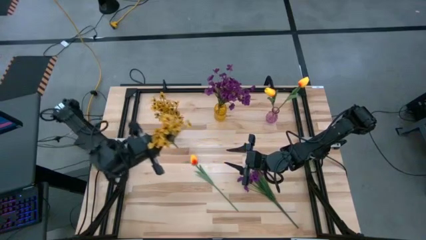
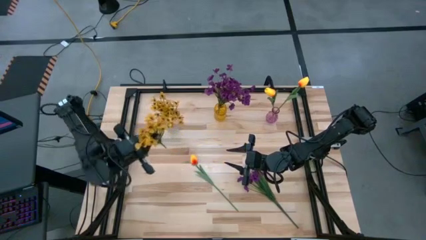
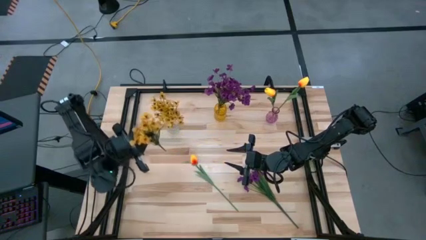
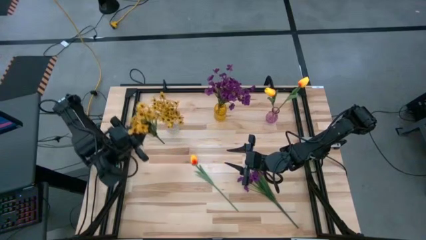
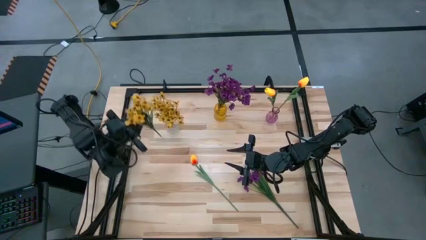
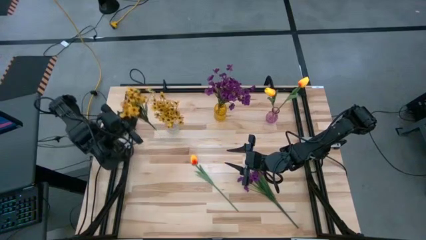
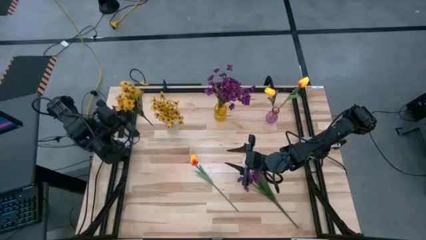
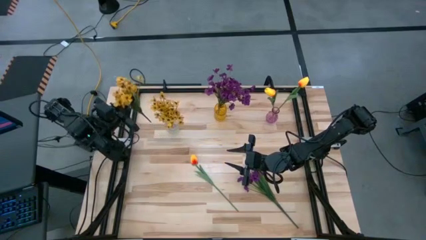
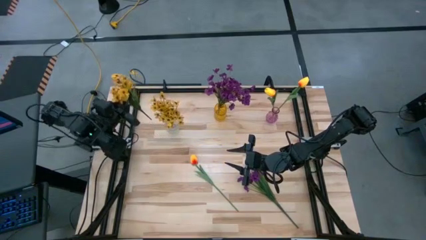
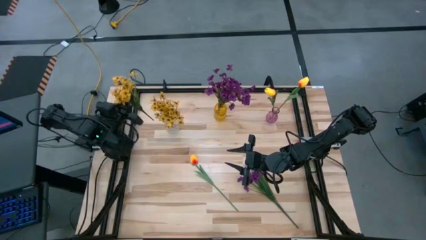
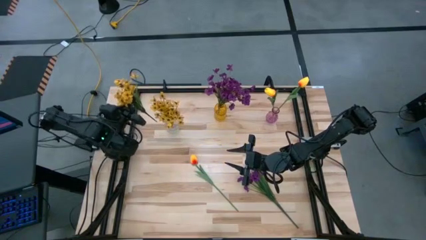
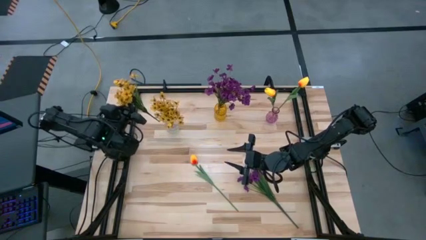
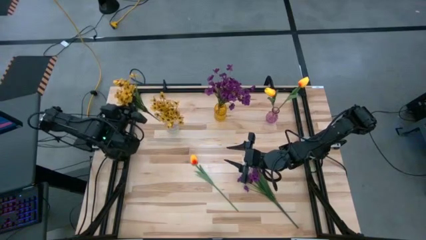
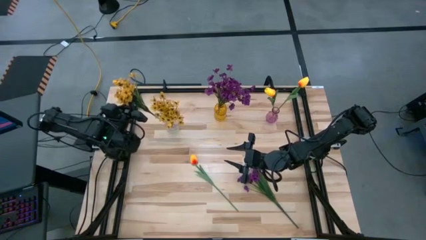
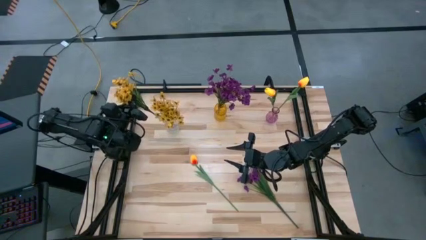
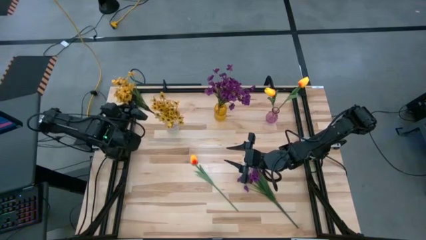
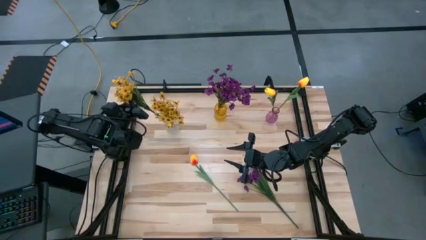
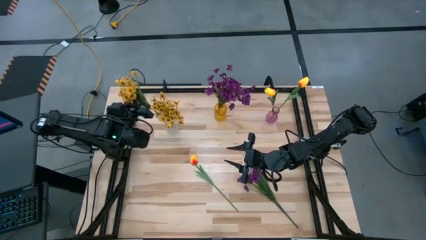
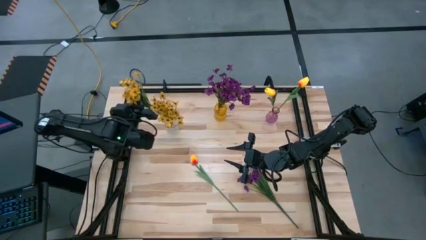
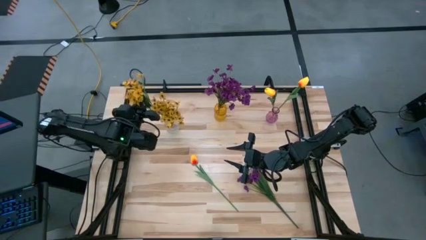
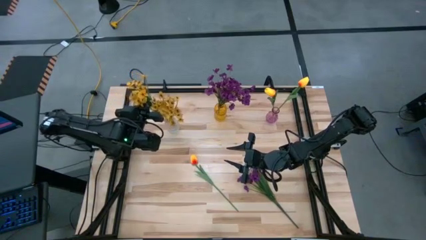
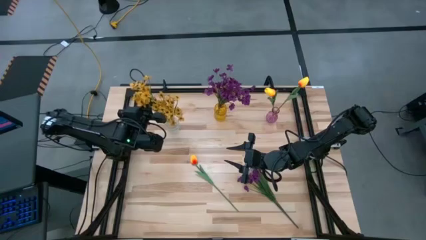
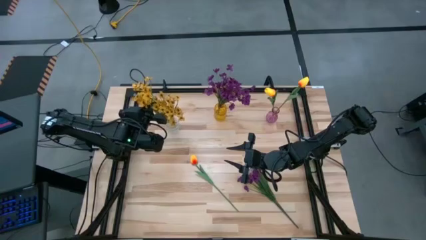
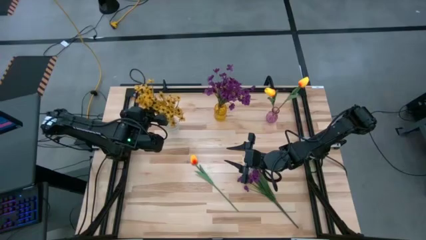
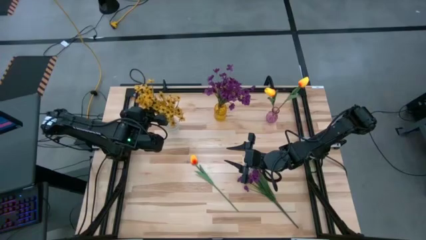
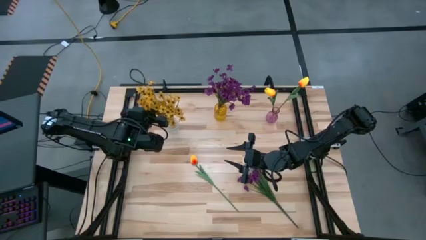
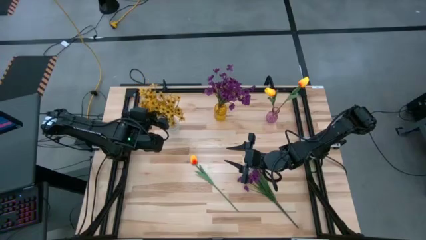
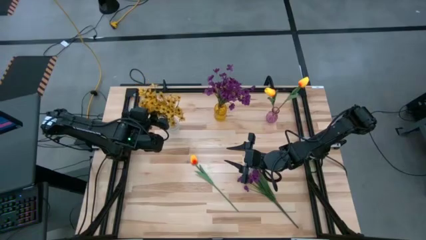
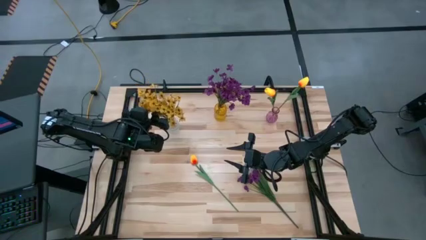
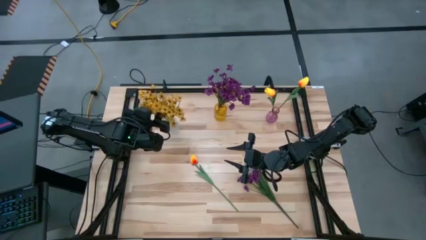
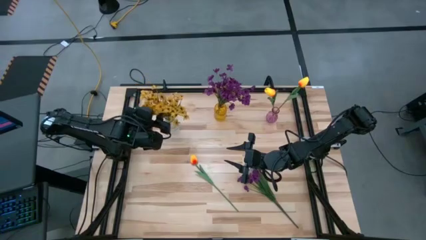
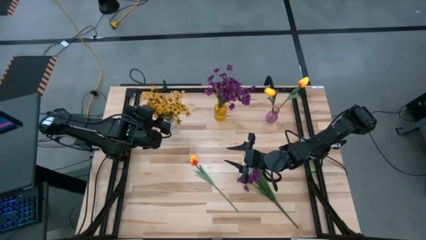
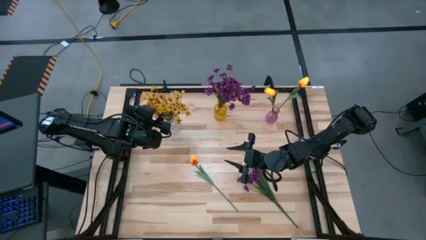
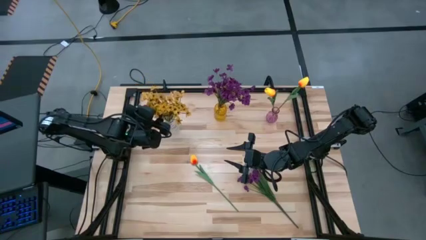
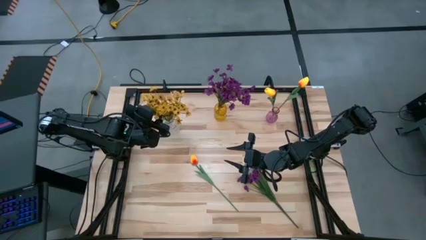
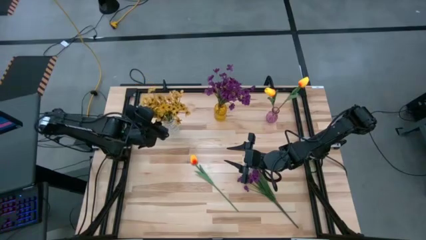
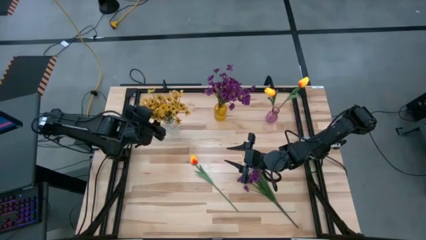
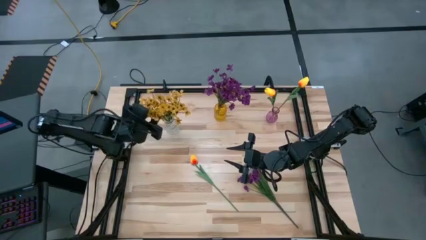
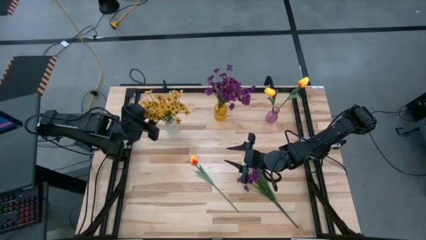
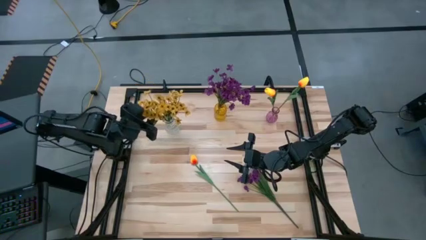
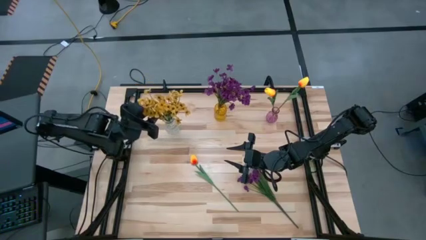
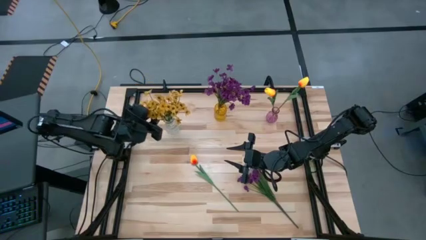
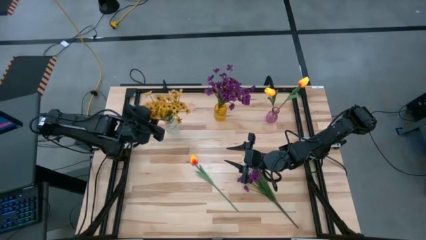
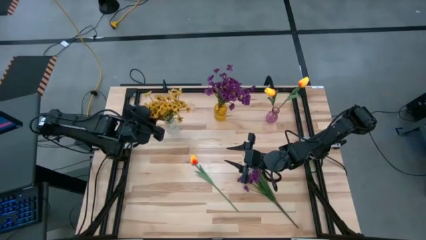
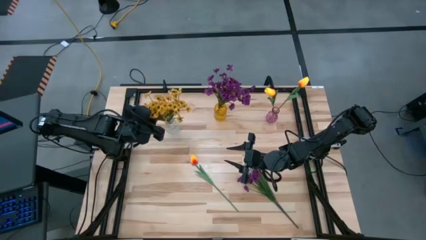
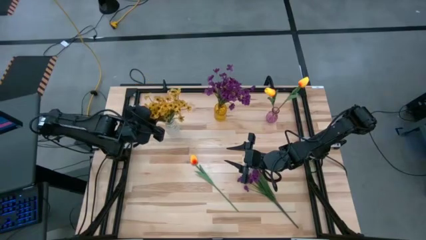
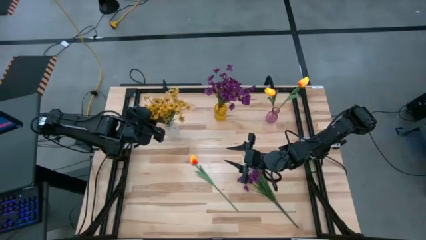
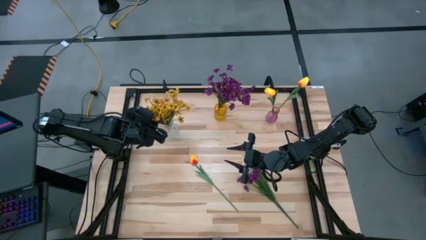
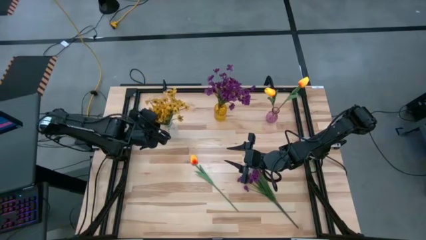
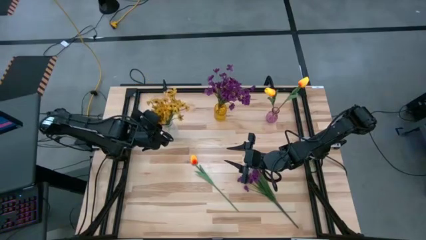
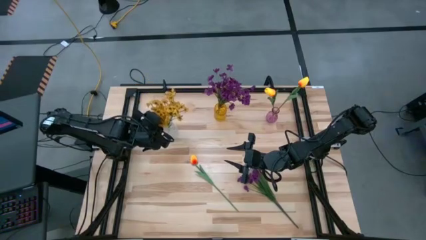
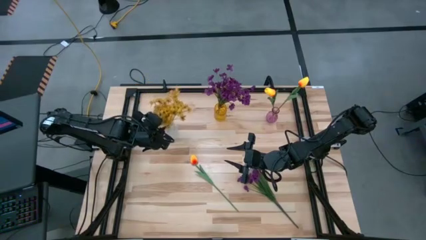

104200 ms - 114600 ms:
Task: Sort flowers into vase by color
Put the yellow flowers into the transparent vase

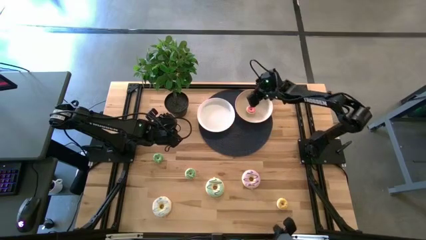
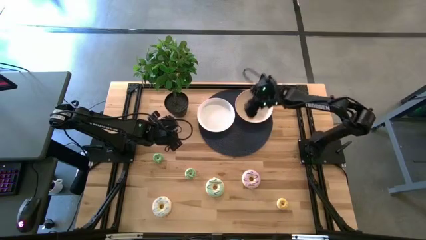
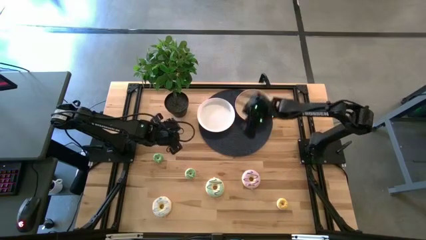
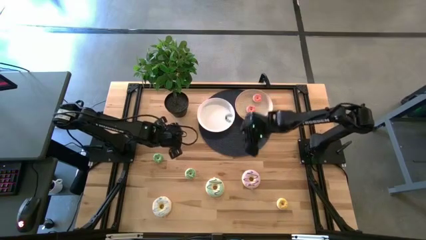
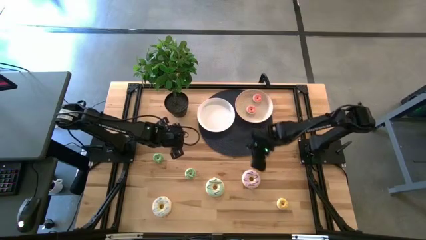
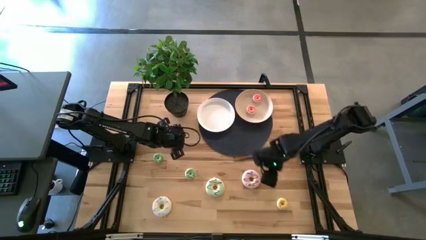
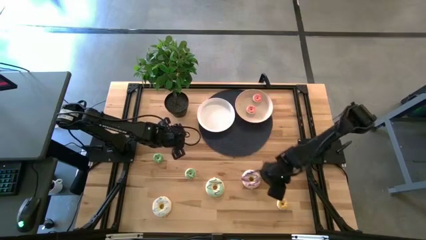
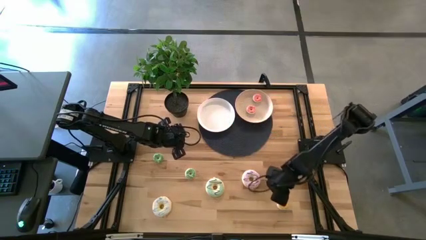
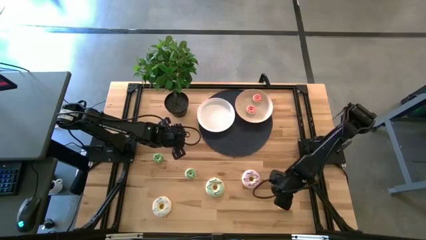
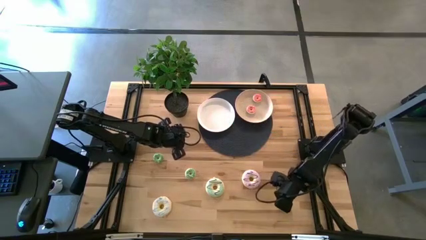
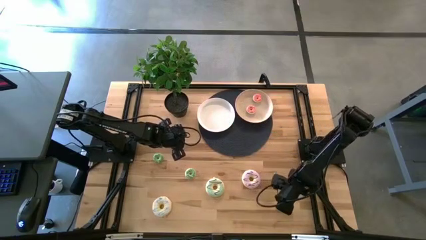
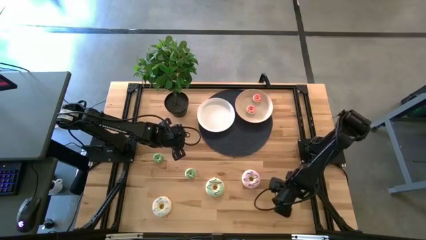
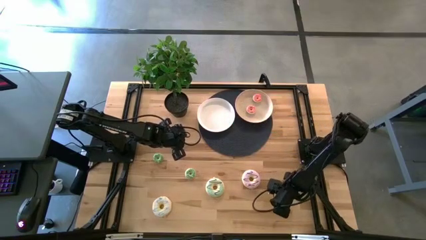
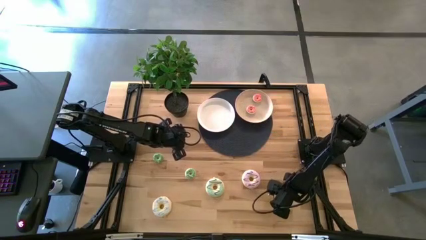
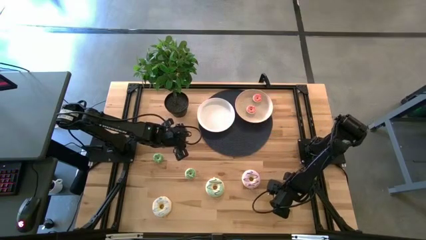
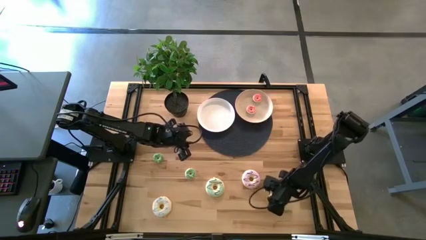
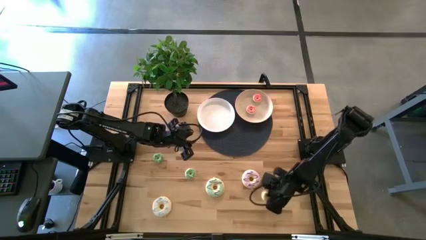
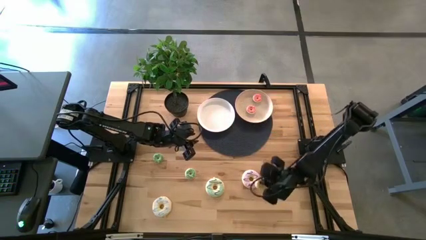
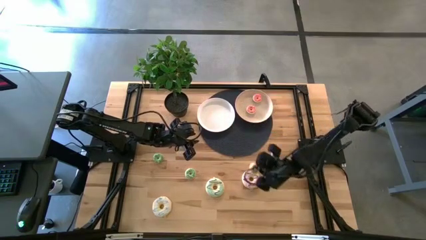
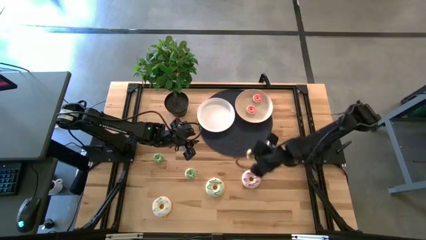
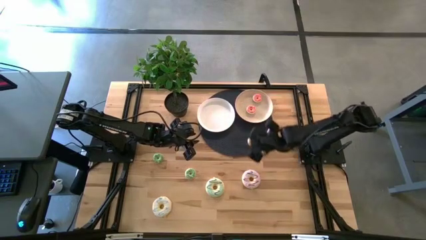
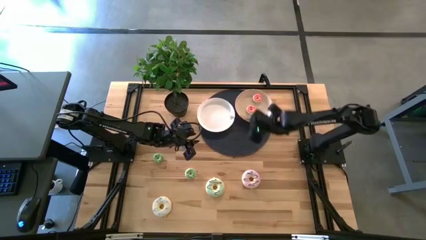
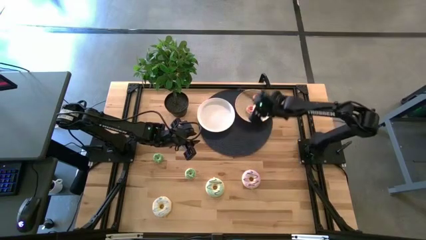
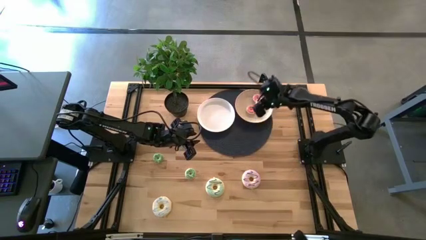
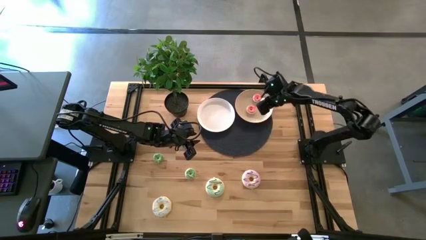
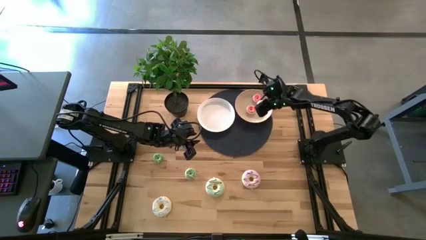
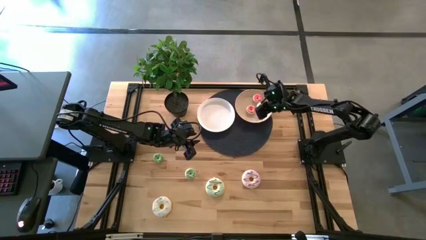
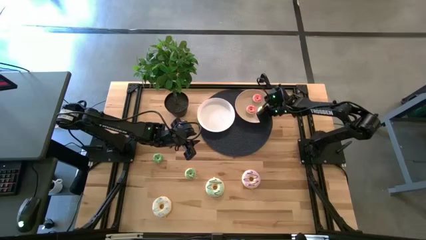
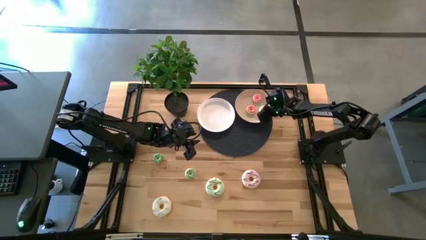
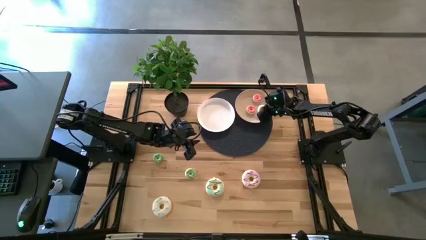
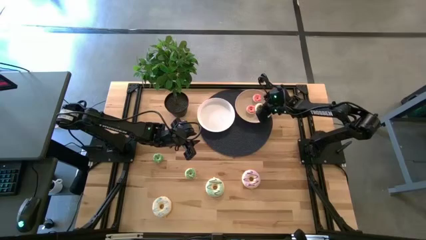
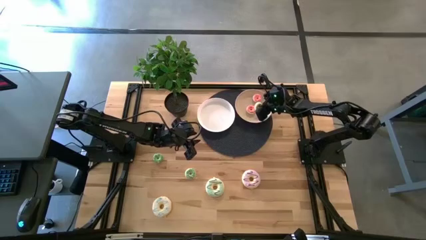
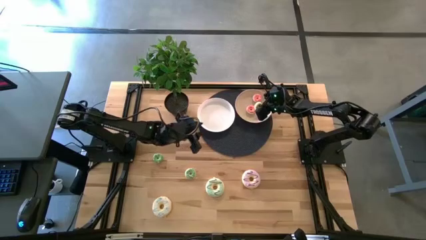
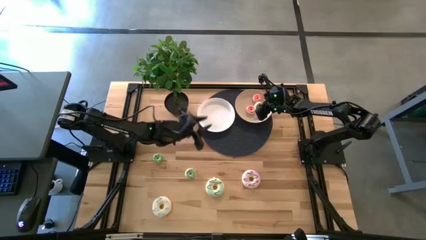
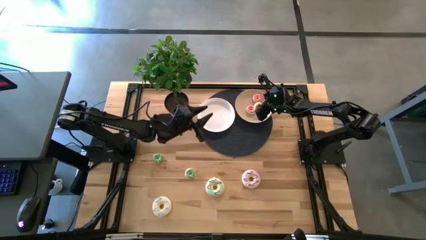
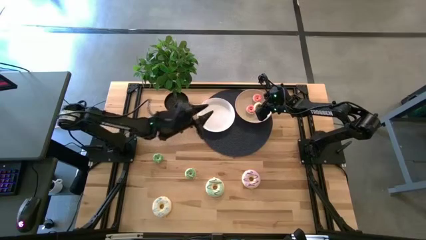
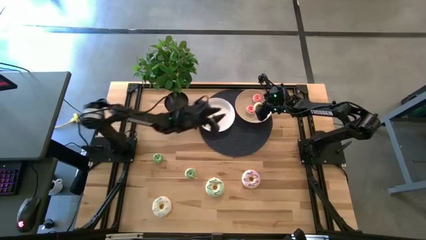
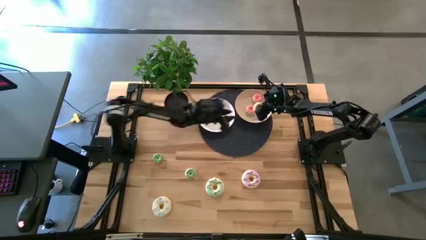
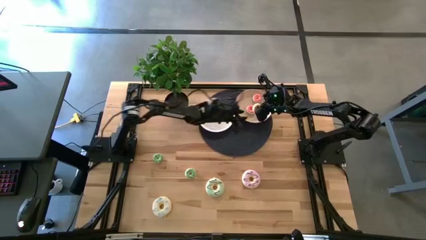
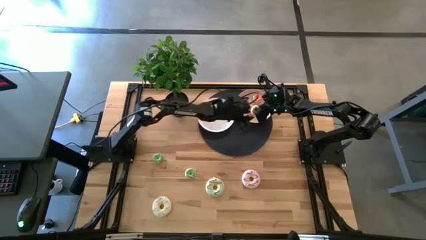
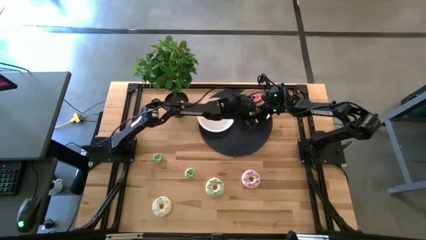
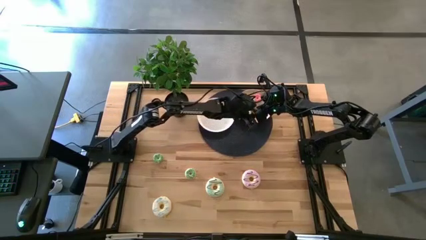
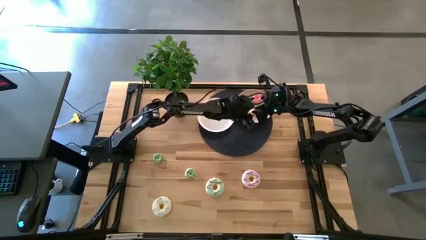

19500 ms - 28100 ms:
Task: Pick & Place donuts
Put the small yellow donut on the brown plate
